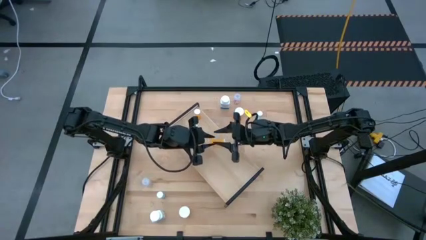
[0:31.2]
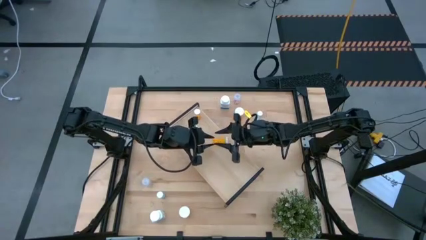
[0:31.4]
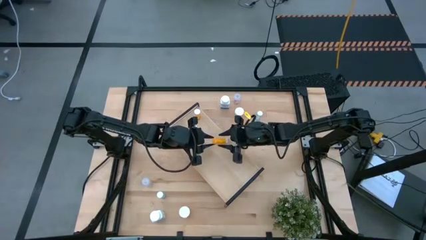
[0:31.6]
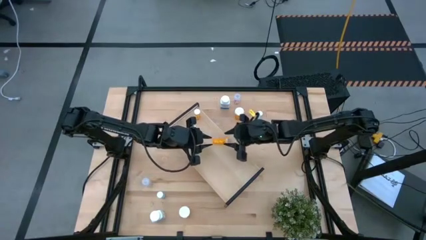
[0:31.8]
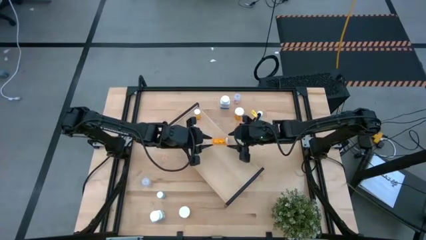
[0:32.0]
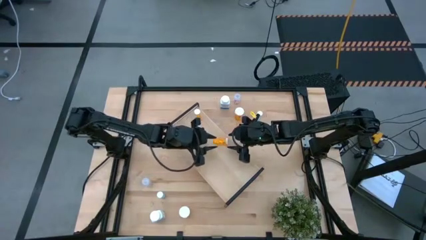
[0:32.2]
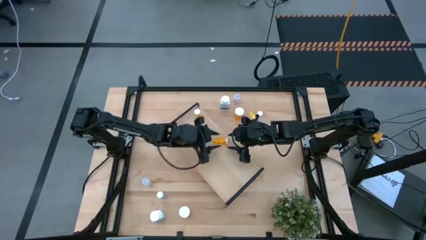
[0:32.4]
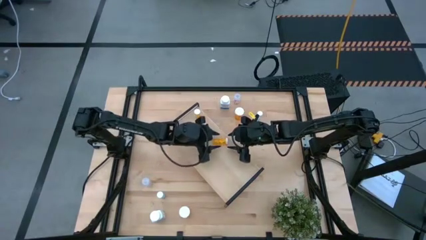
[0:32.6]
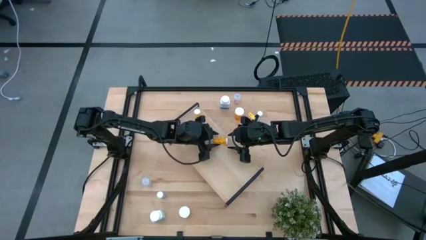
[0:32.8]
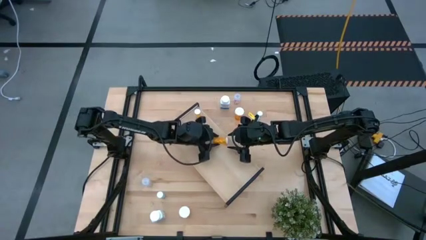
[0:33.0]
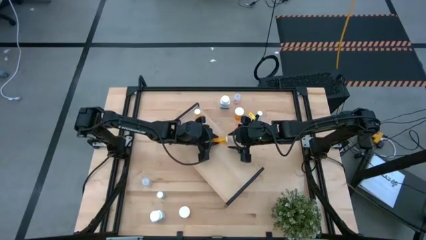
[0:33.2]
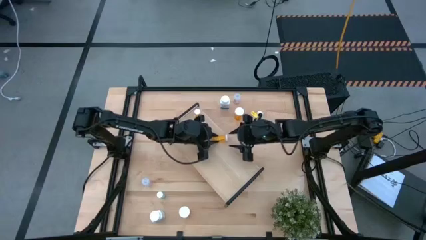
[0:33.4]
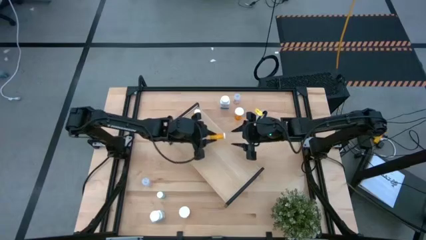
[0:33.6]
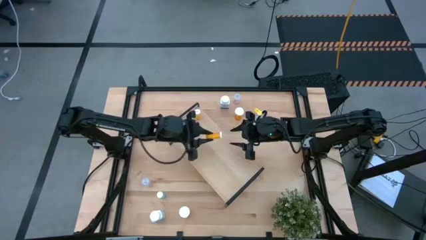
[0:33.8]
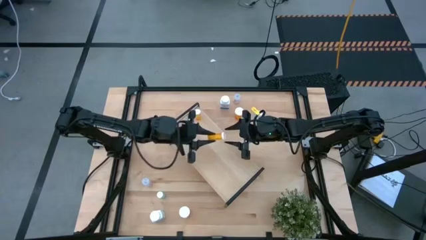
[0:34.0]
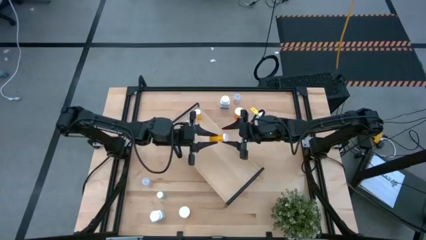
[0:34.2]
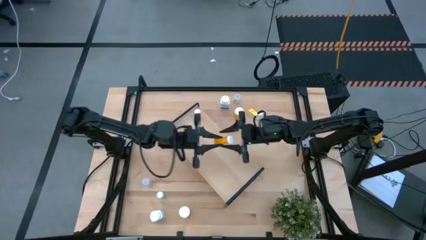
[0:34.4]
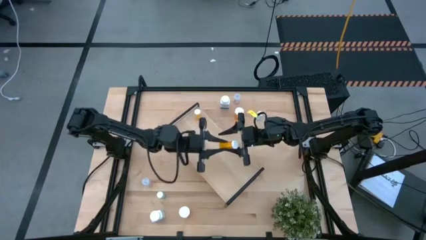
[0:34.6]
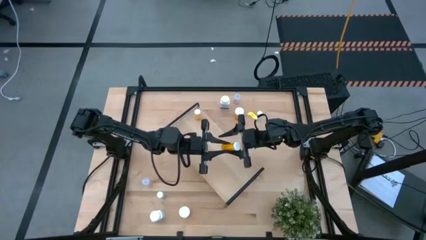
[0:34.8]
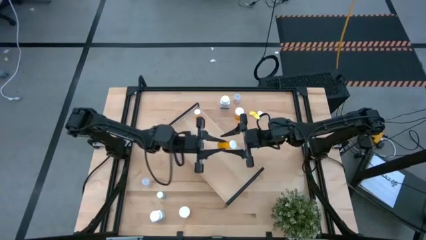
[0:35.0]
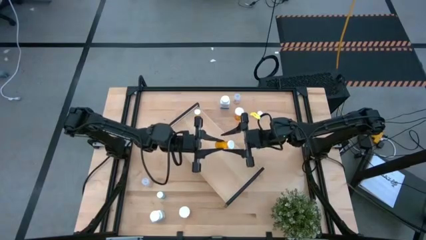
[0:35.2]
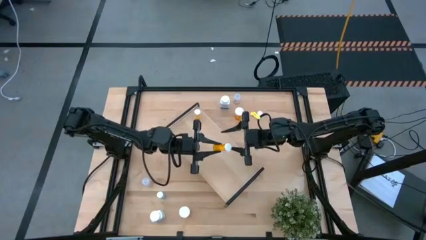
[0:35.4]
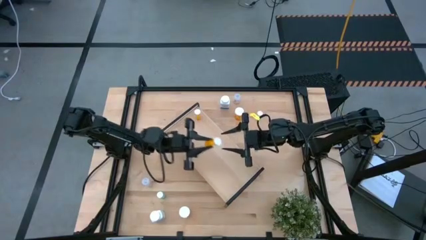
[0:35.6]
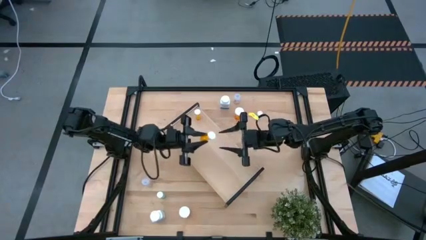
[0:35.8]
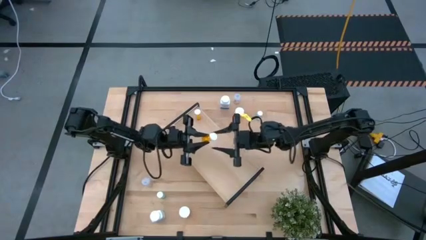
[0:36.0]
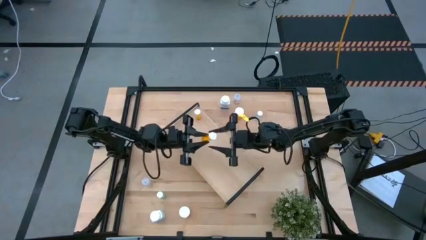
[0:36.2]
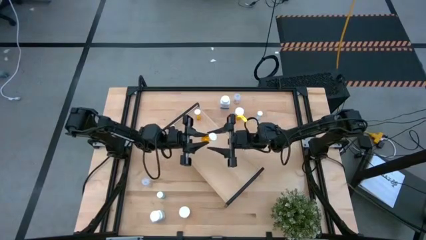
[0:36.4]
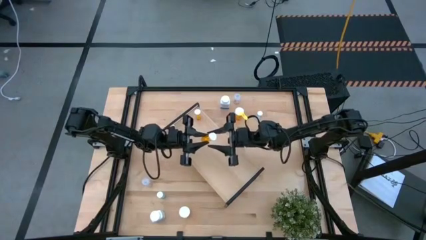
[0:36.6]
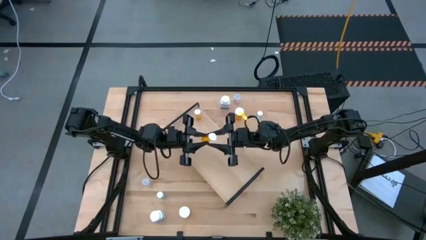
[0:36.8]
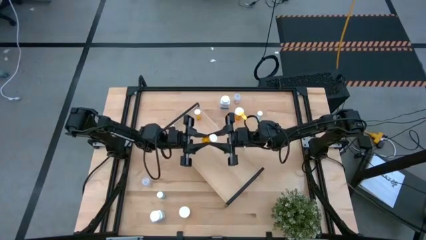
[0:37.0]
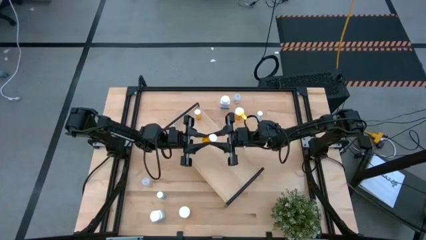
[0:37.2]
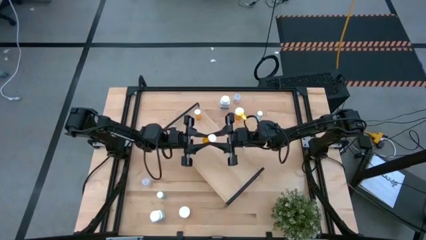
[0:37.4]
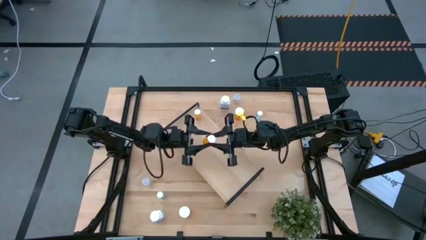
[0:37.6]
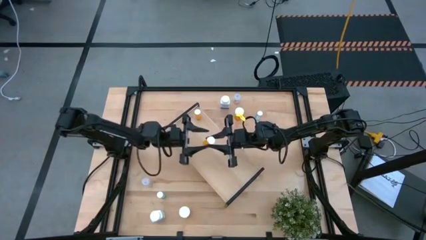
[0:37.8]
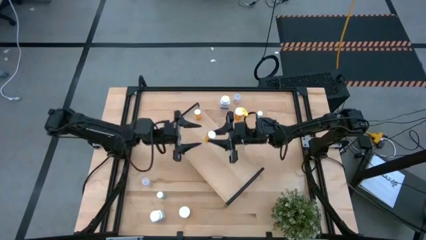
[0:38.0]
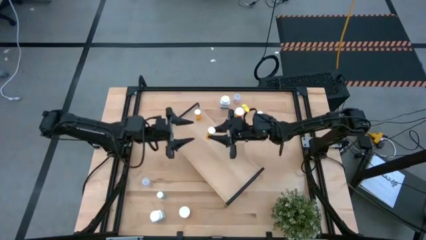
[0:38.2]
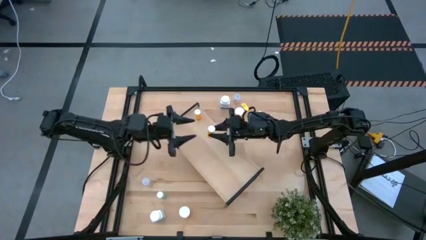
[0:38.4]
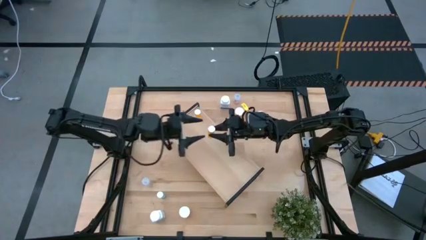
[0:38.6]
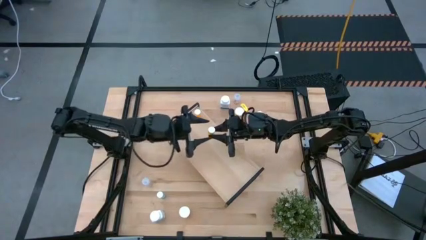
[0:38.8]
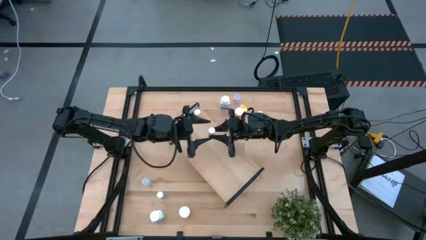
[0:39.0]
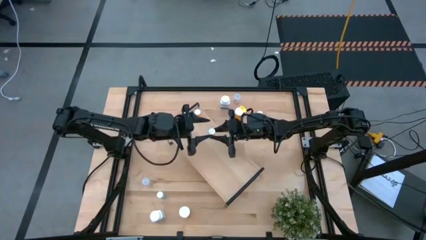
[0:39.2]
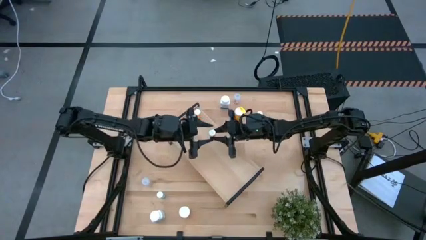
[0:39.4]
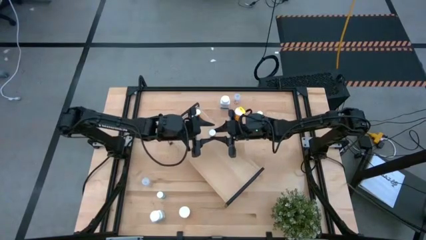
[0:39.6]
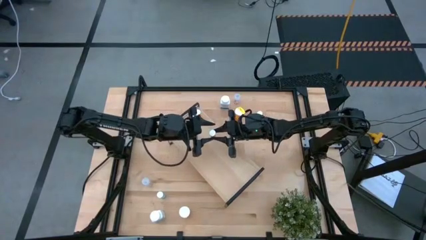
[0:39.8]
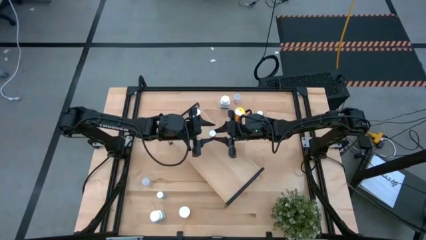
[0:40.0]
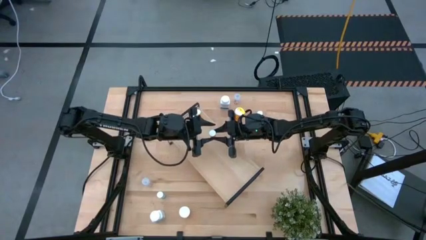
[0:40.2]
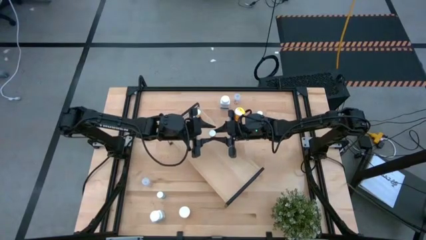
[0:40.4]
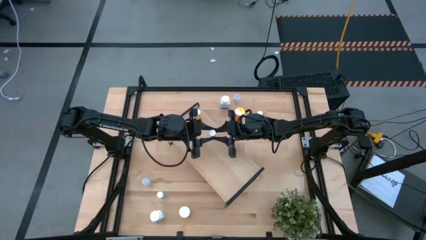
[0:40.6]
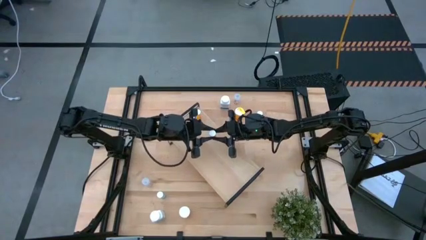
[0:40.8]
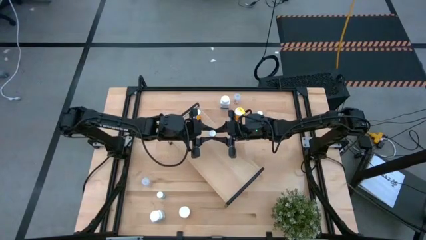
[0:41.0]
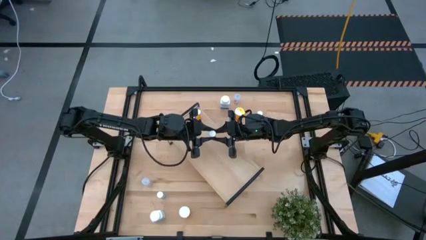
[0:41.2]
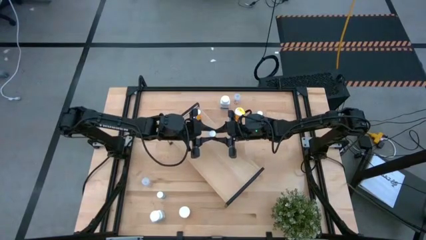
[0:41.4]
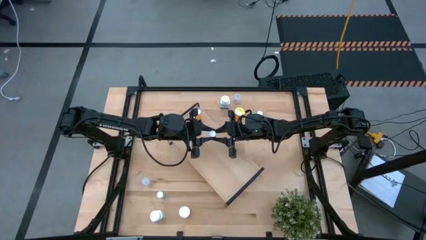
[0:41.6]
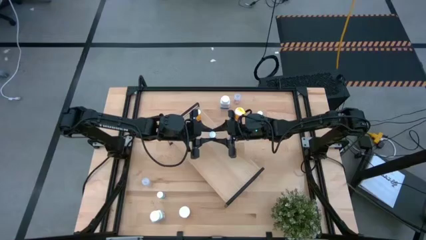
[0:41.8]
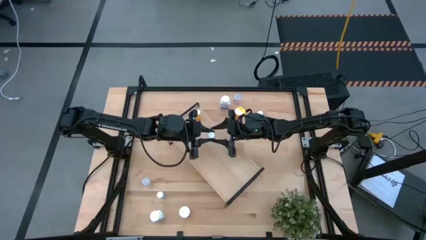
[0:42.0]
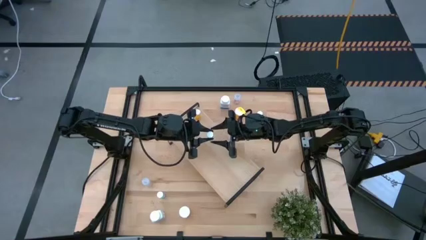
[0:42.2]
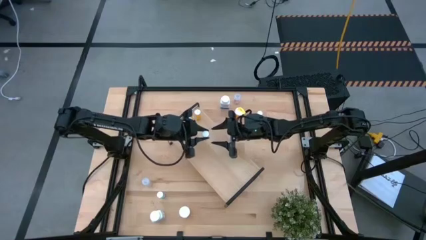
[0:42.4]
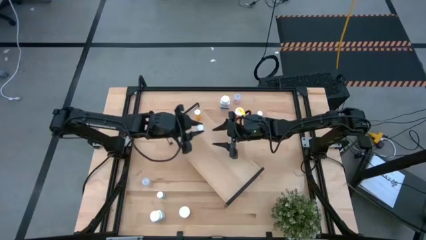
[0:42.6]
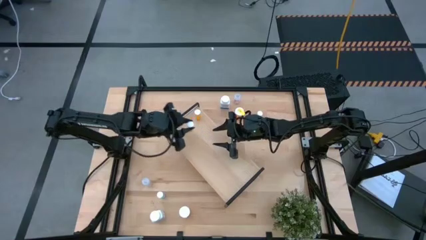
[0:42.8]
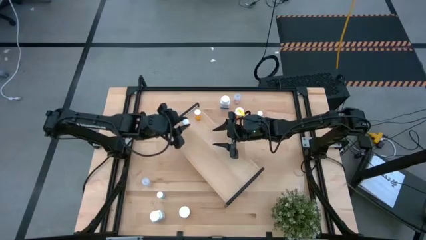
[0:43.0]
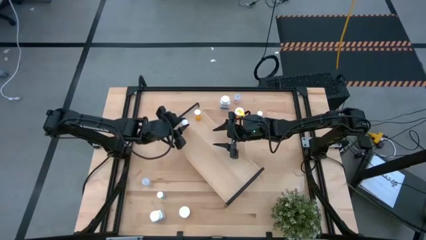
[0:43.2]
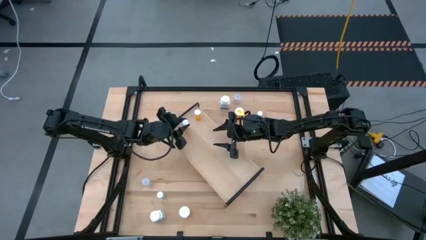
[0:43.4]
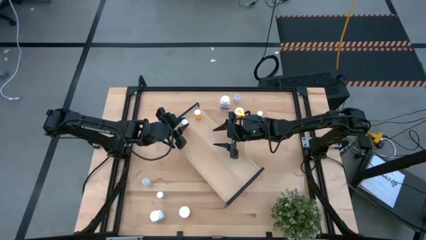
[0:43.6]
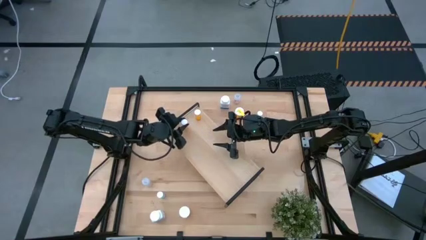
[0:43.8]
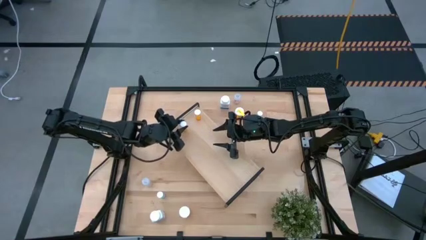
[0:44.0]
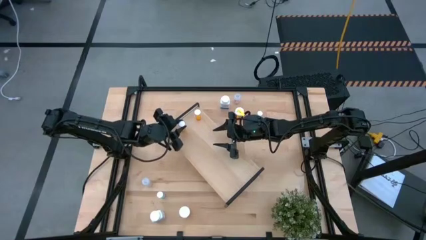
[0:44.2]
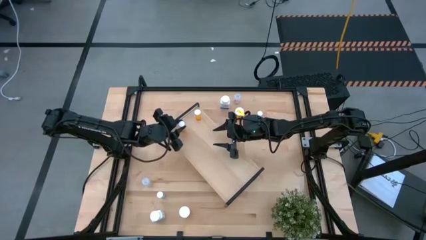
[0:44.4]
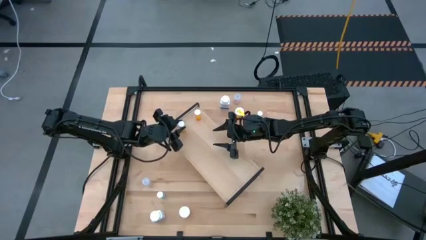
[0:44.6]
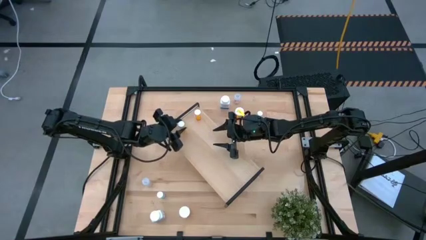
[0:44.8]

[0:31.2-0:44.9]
Task: Pick and place medicine bottles onto shelf by color
Put the small orange pill bottle on the shelf aligned with the small orange pill bottle
